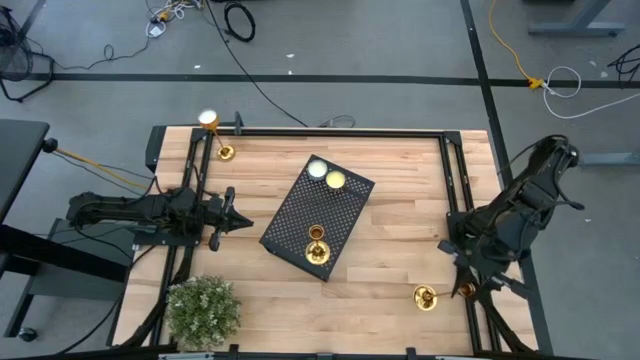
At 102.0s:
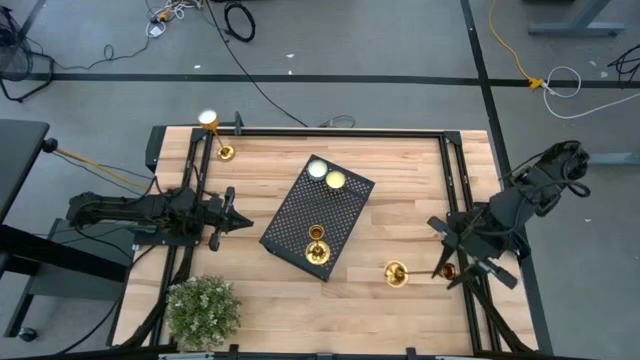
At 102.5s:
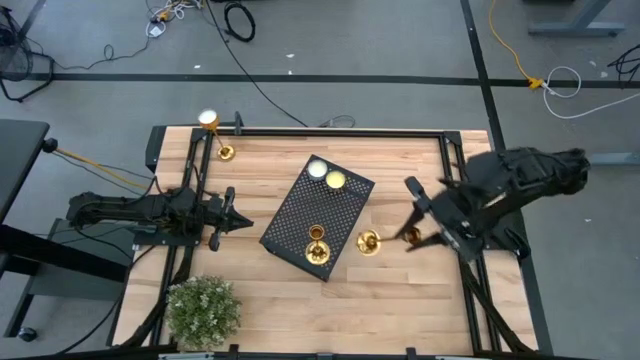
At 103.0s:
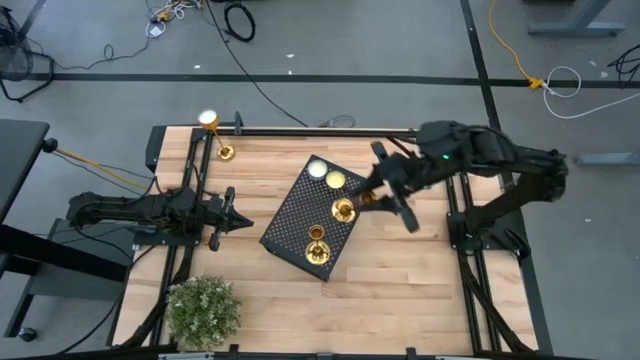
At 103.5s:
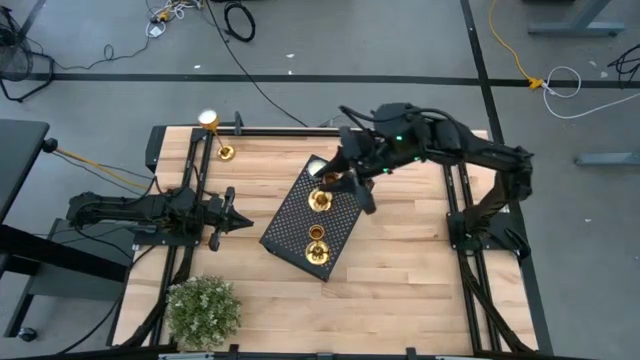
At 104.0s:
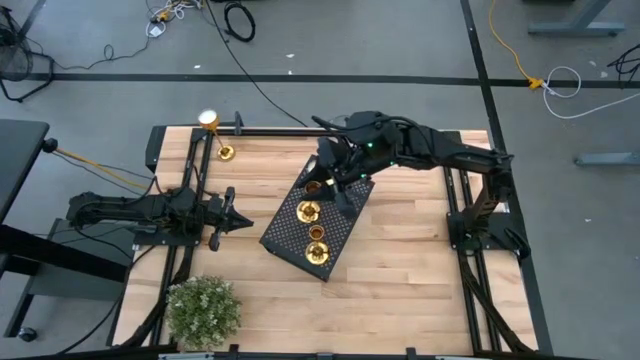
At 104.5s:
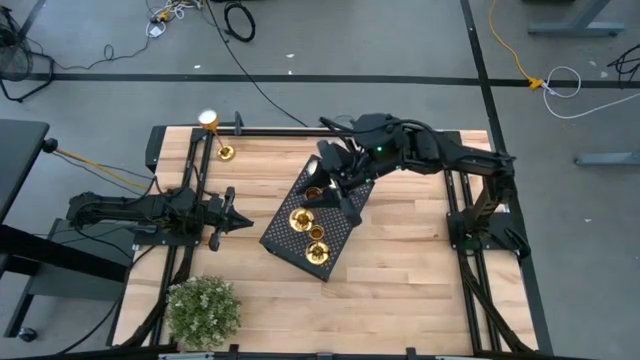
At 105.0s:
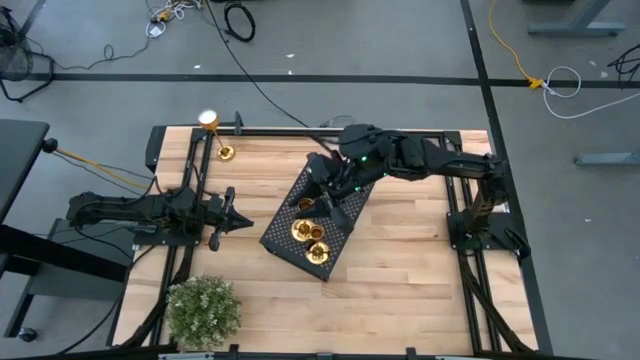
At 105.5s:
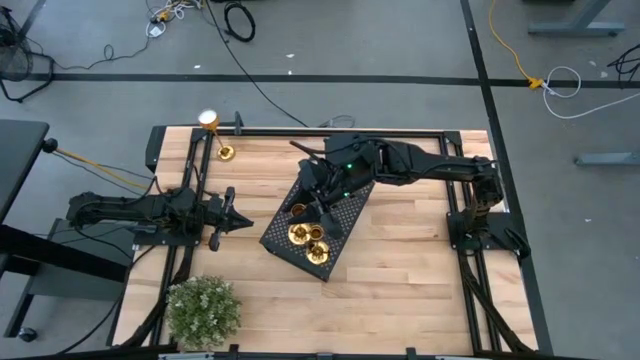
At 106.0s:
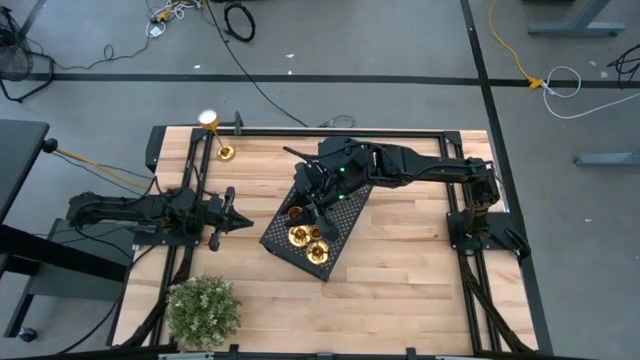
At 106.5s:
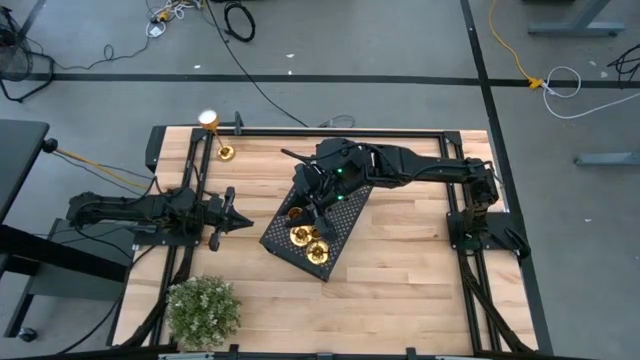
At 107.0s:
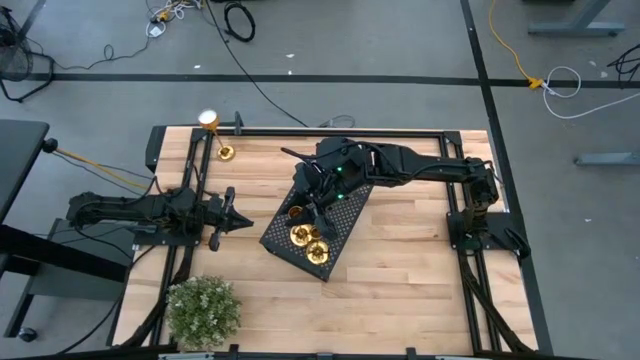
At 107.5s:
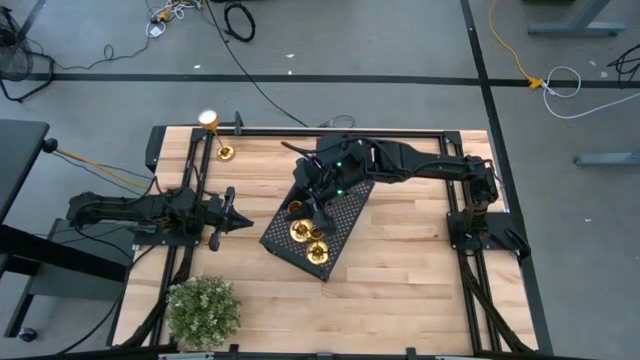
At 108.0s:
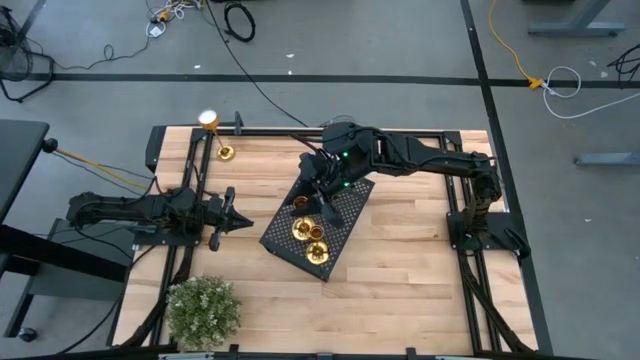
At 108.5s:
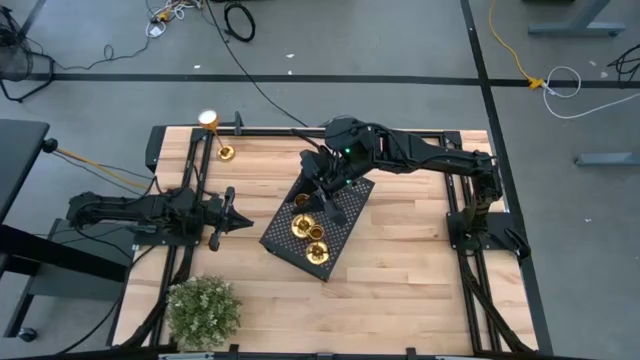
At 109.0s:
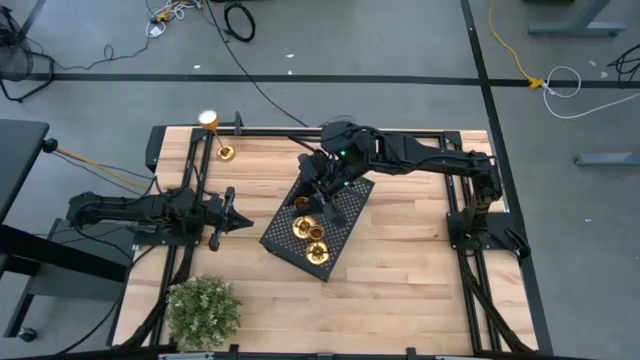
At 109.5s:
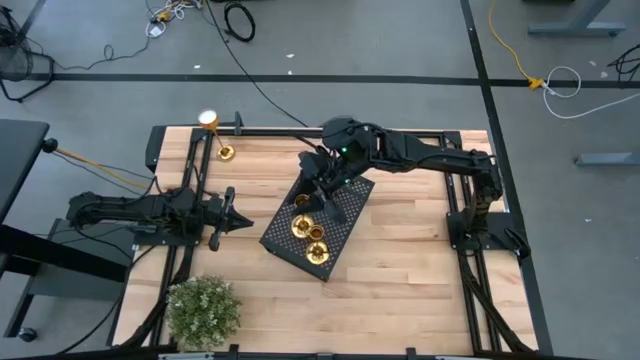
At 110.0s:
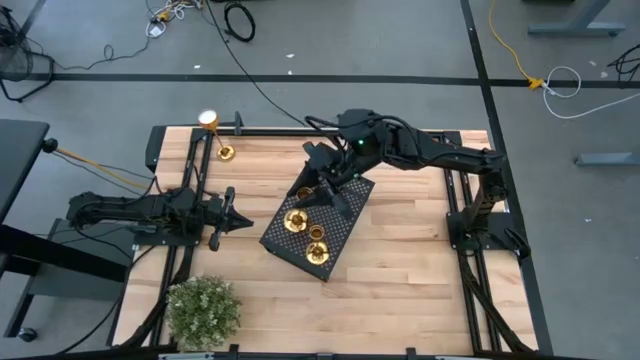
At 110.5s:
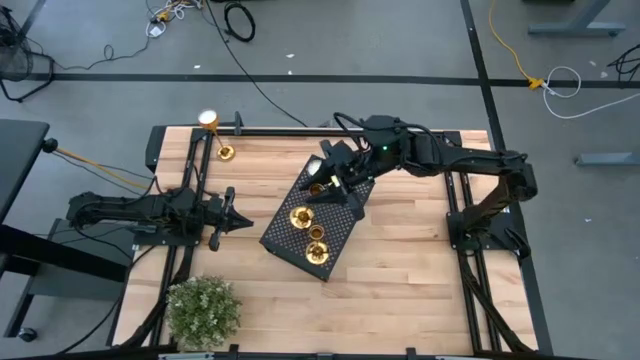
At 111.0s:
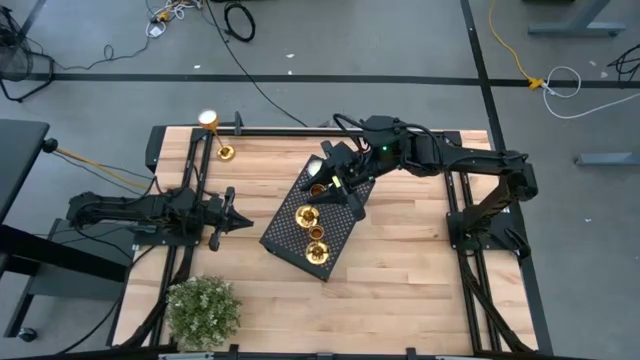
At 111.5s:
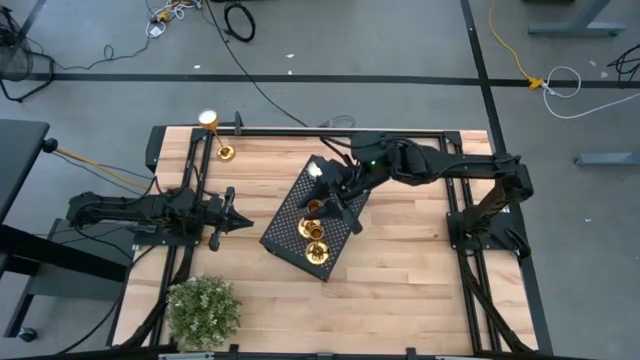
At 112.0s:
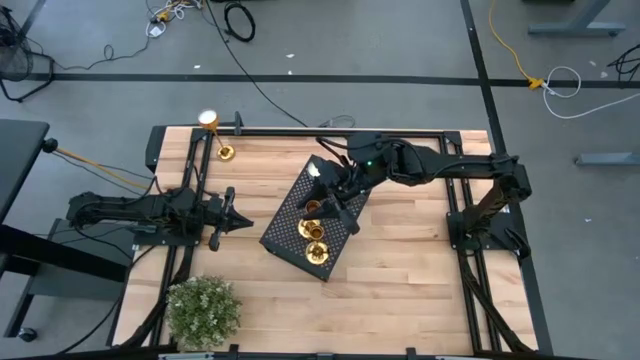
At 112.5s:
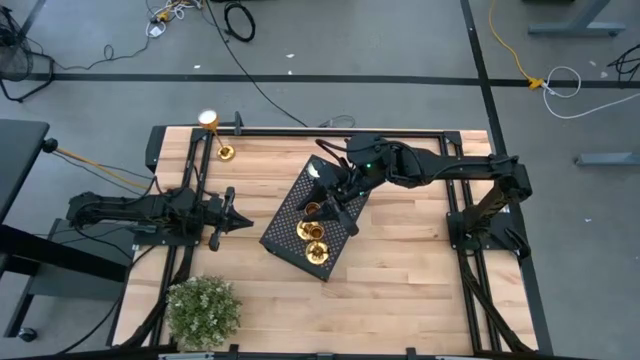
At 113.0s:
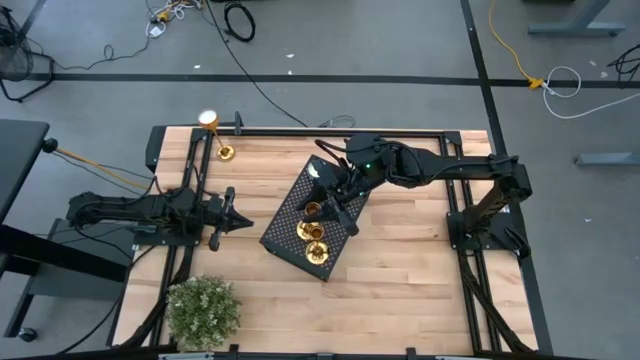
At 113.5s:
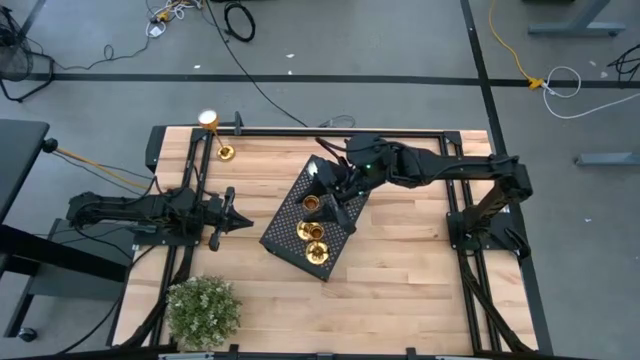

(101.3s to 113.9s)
Task: Stock candles on shelf
Put the bottom gold candle holder on the shelf

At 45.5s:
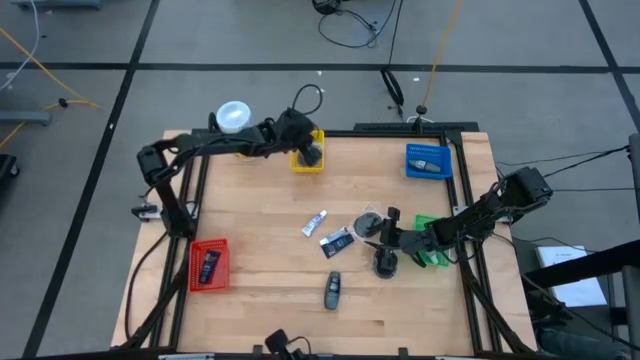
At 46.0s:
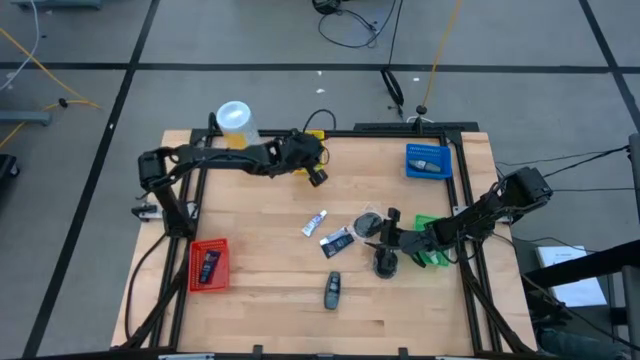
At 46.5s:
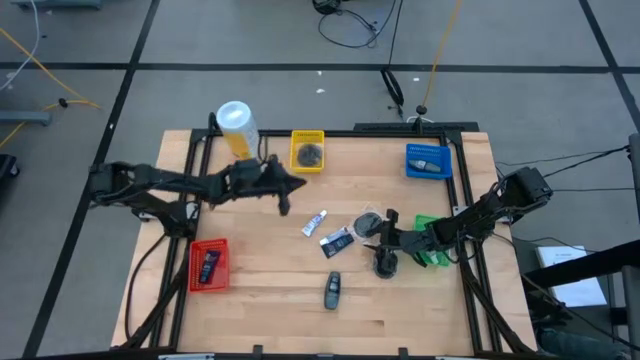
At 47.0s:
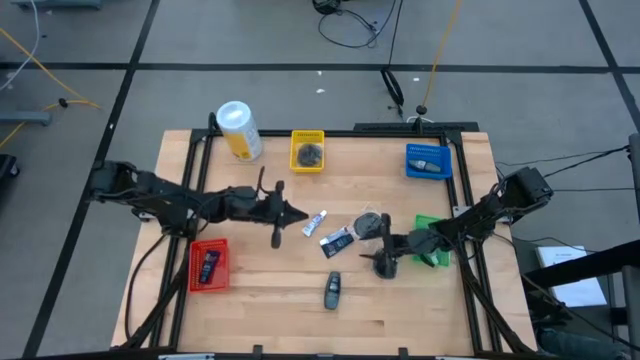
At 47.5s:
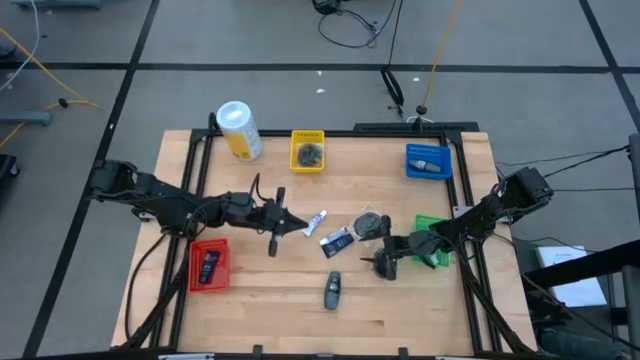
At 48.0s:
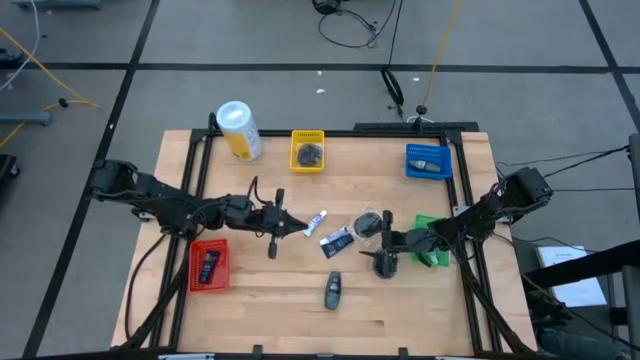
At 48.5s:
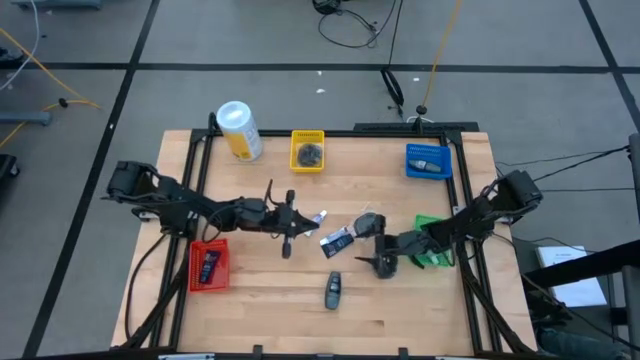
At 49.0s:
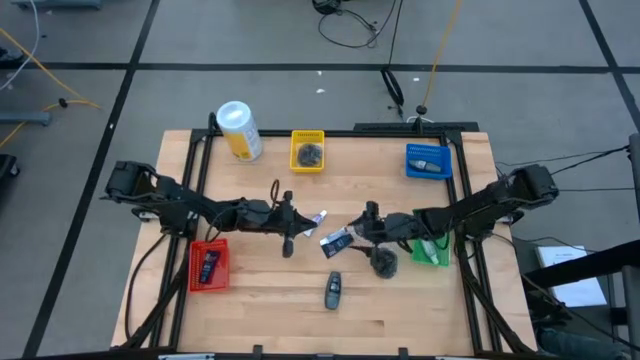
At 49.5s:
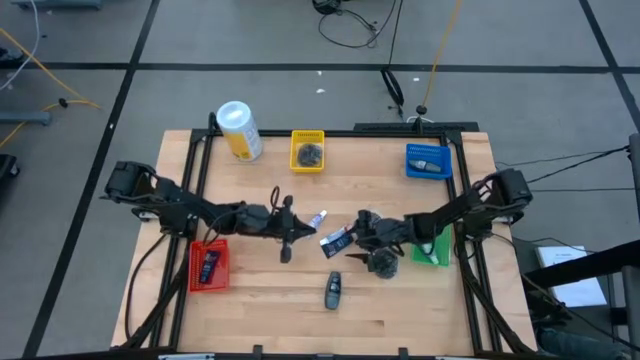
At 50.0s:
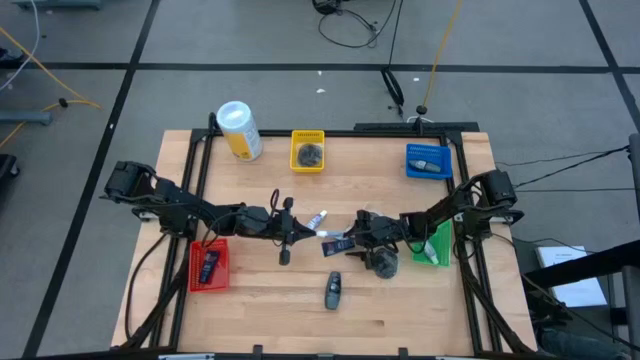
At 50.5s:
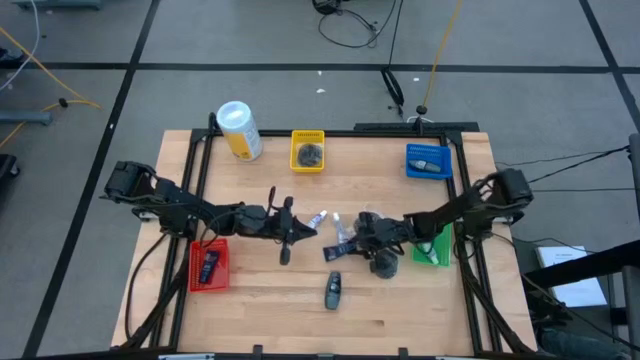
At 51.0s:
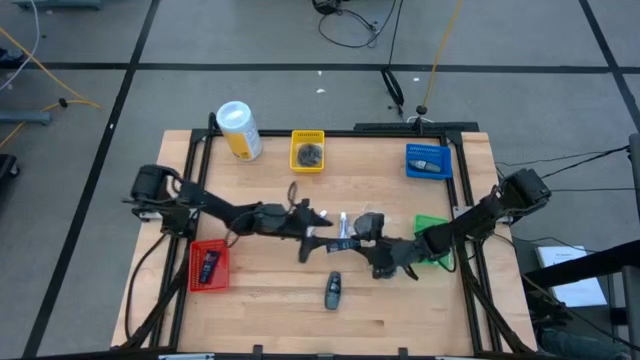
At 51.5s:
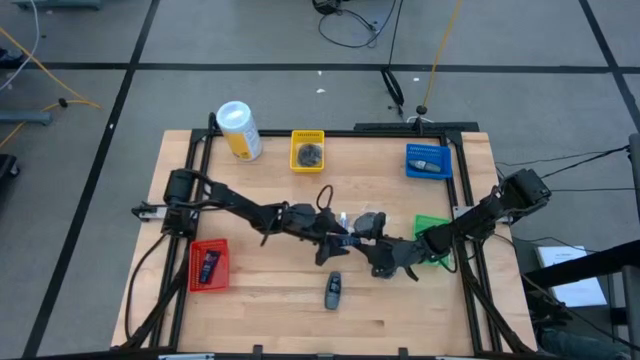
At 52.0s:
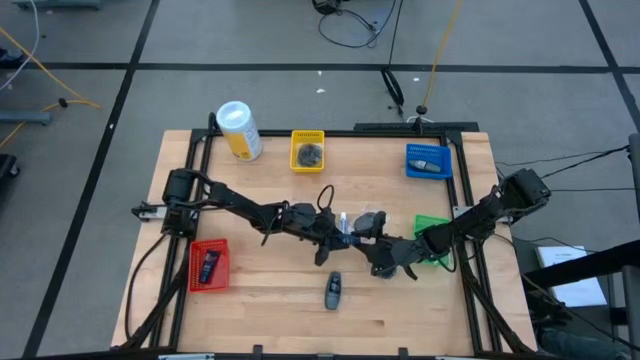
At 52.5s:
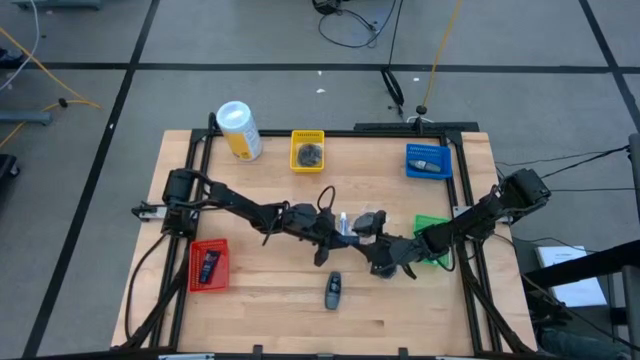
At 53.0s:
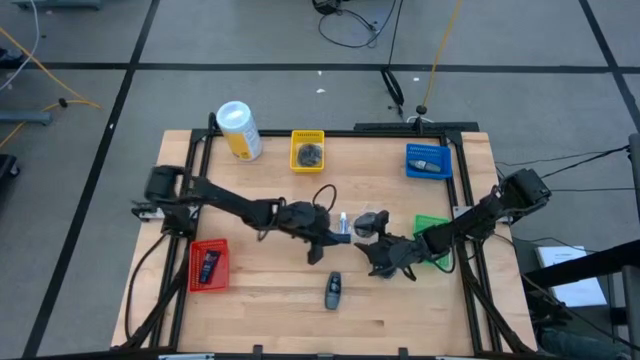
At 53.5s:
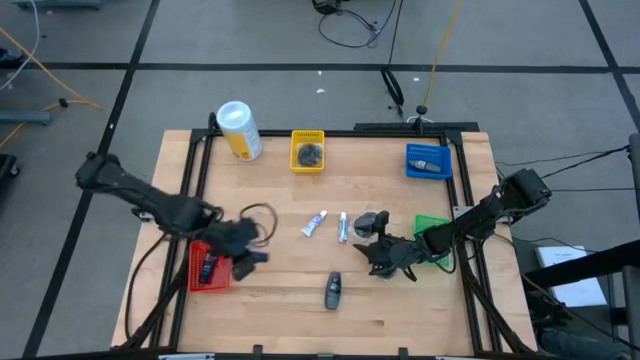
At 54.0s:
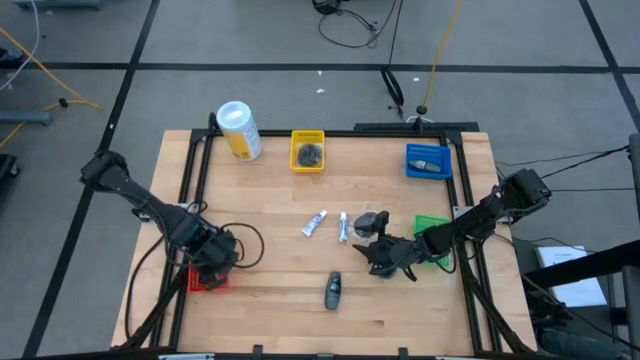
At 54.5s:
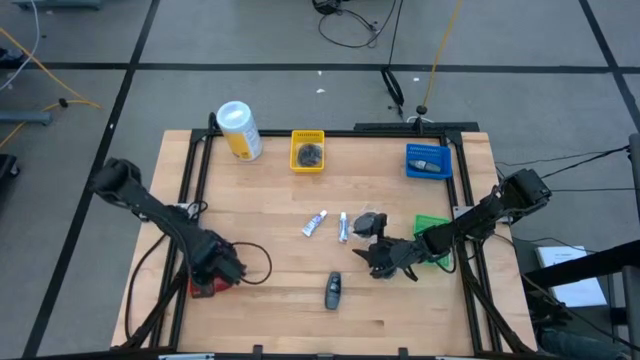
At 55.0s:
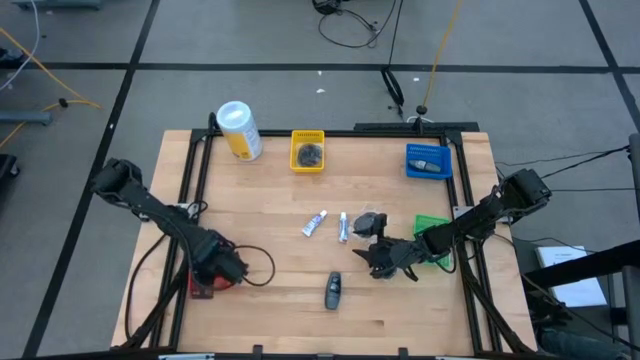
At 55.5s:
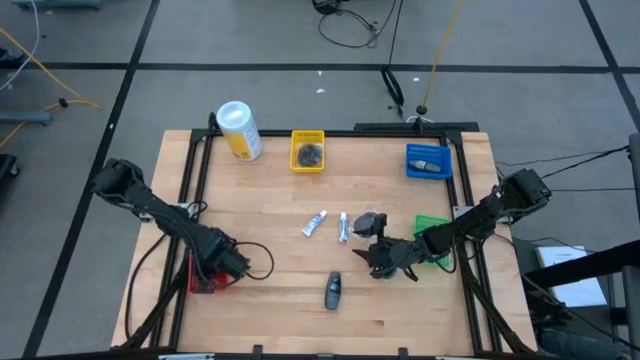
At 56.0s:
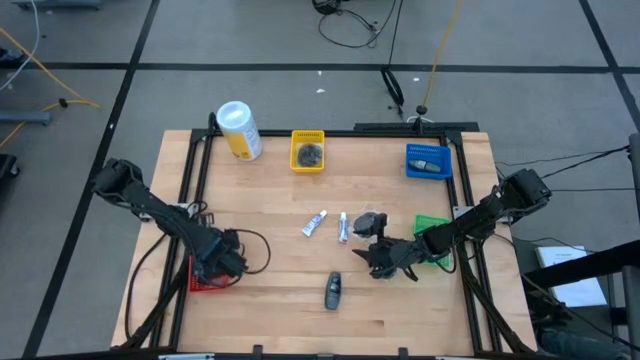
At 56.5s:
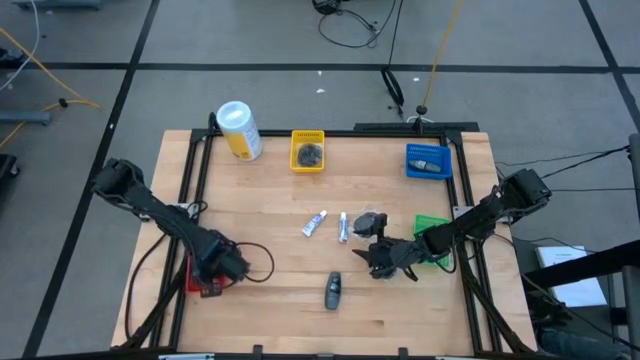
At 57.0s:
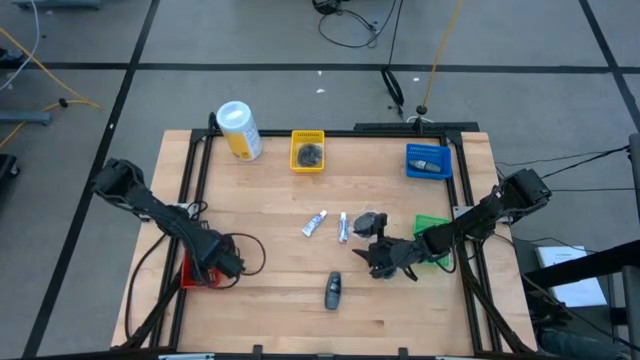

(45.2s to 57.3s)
Task: Pick & Place Travel size toiletries
Put the shaving cream into the red bin
